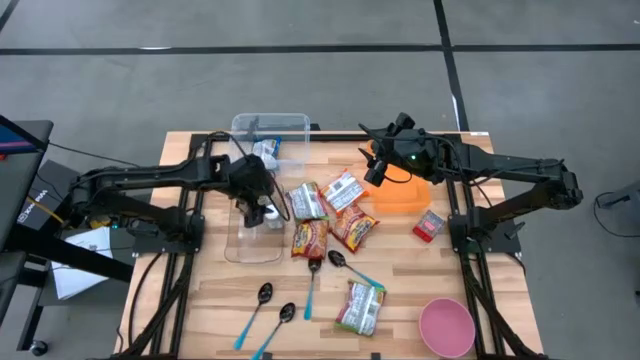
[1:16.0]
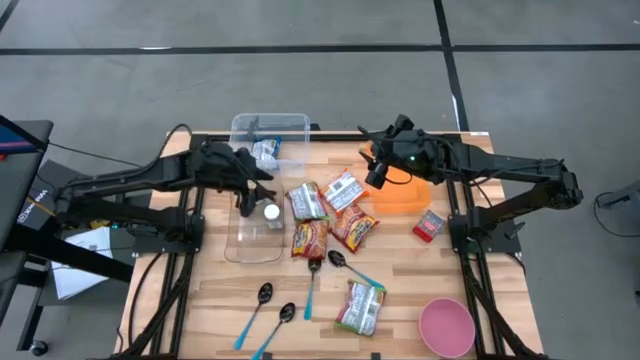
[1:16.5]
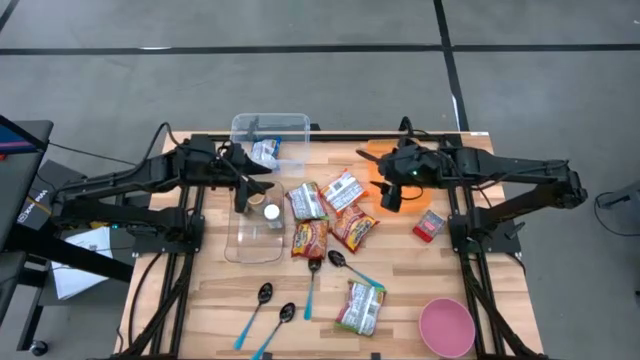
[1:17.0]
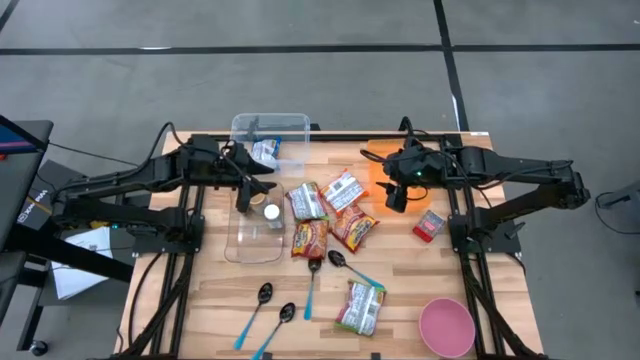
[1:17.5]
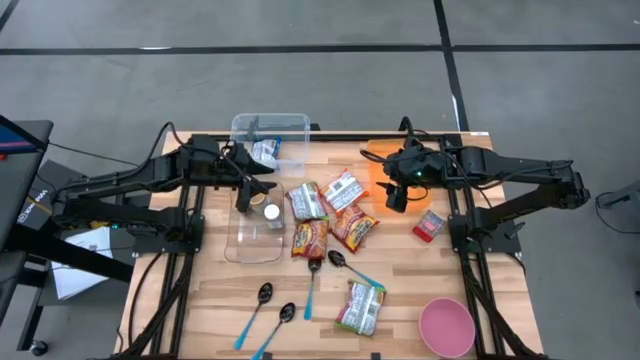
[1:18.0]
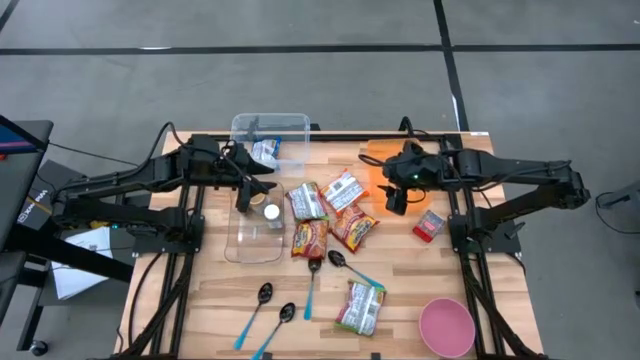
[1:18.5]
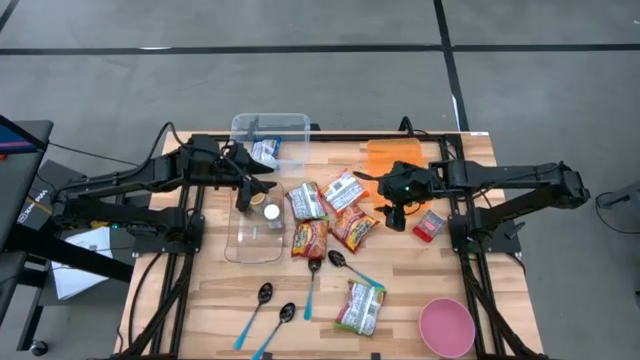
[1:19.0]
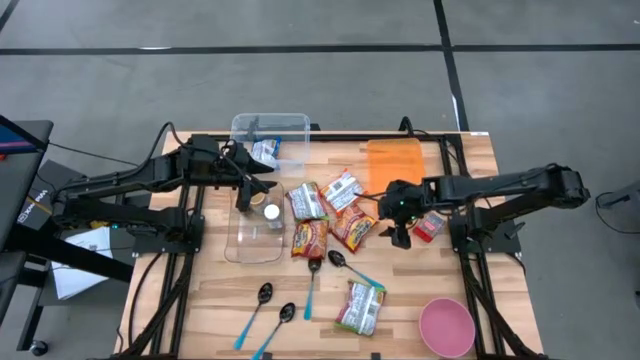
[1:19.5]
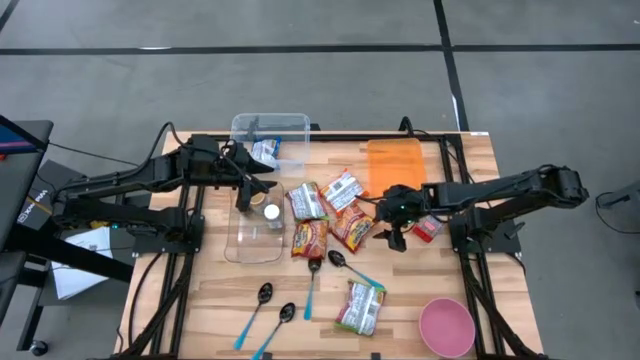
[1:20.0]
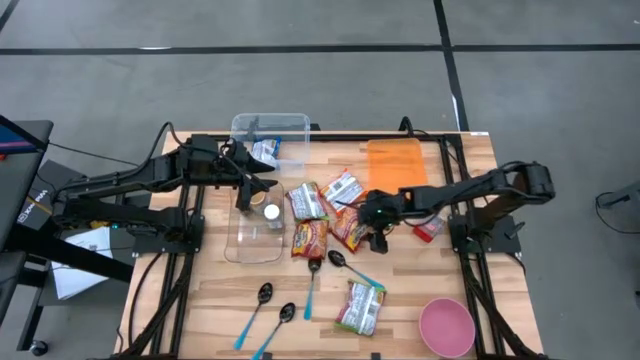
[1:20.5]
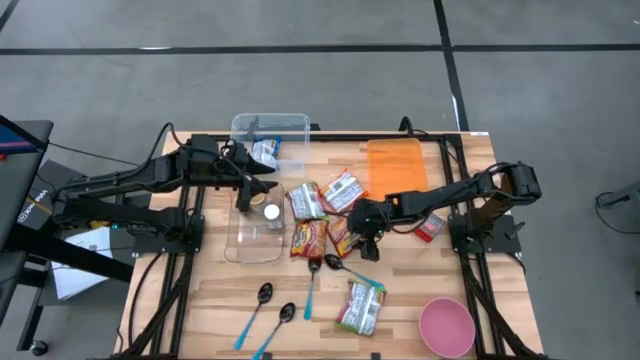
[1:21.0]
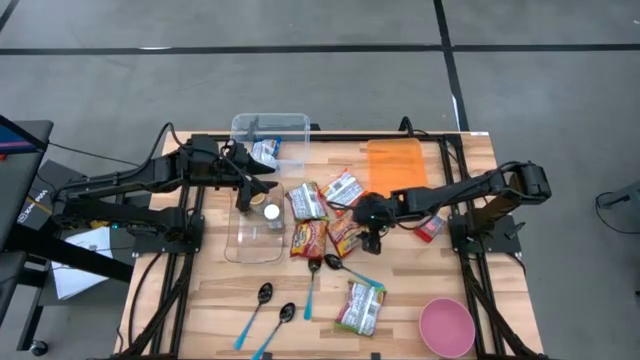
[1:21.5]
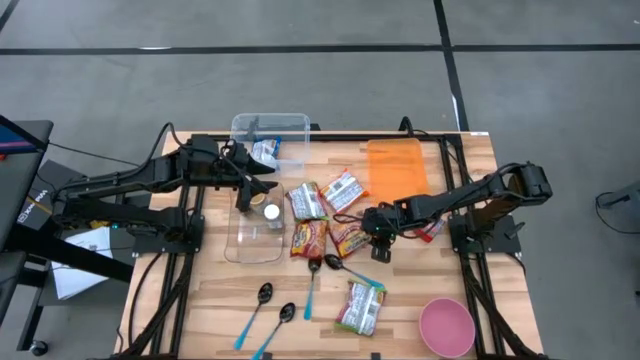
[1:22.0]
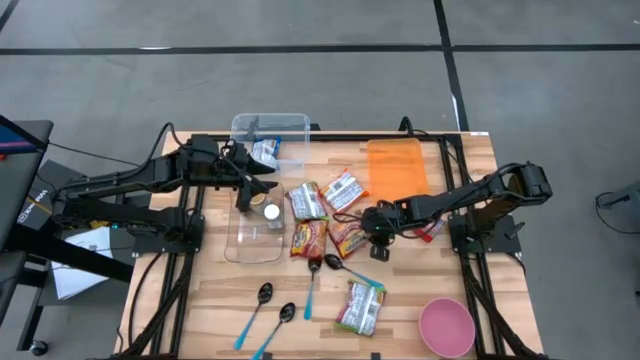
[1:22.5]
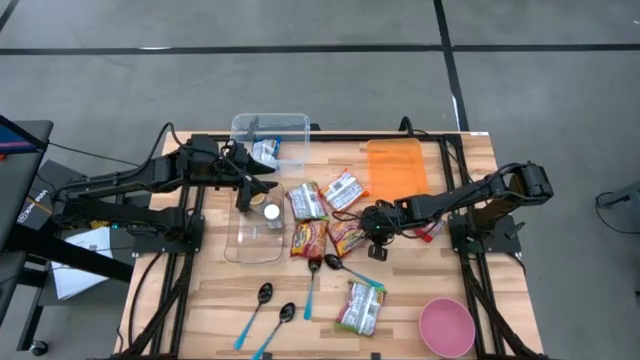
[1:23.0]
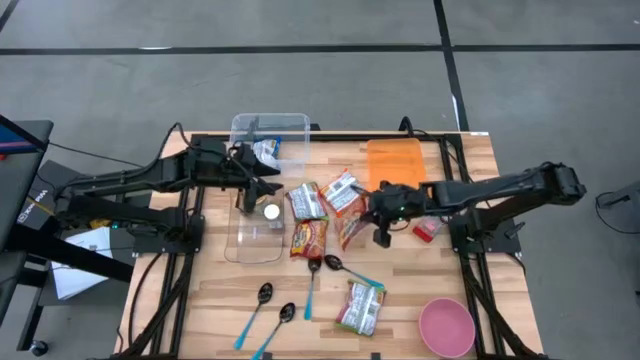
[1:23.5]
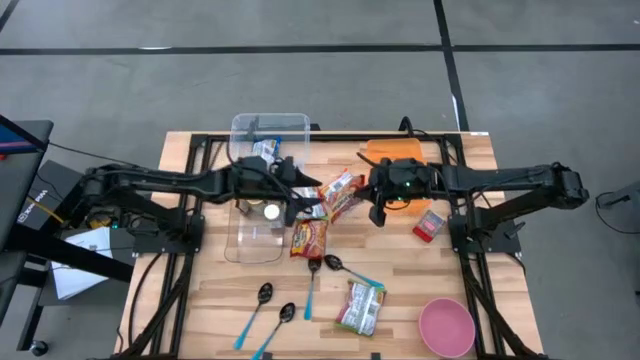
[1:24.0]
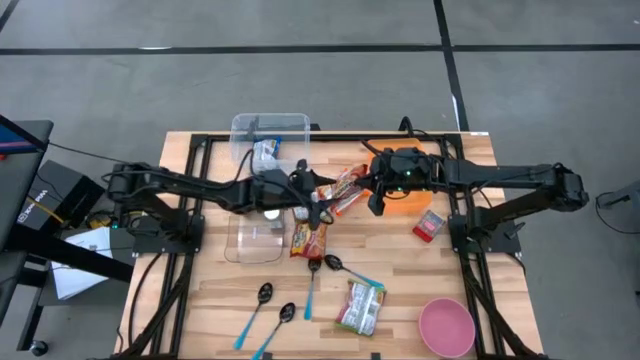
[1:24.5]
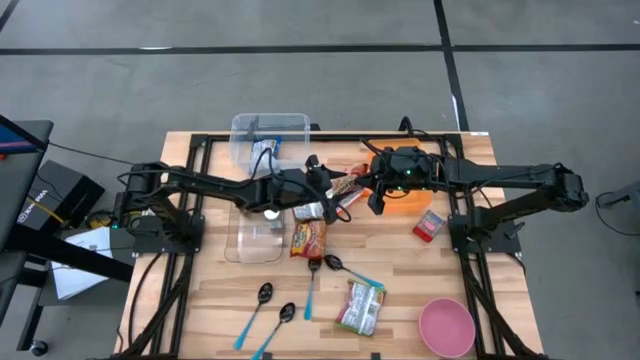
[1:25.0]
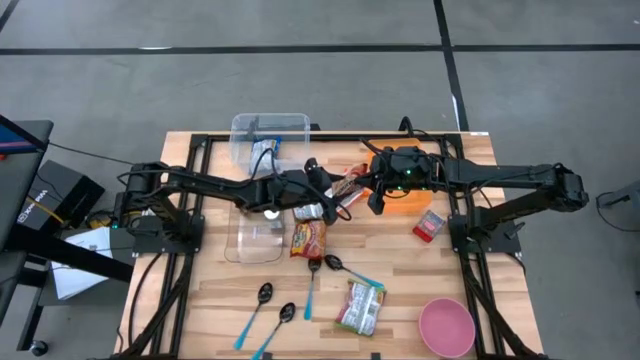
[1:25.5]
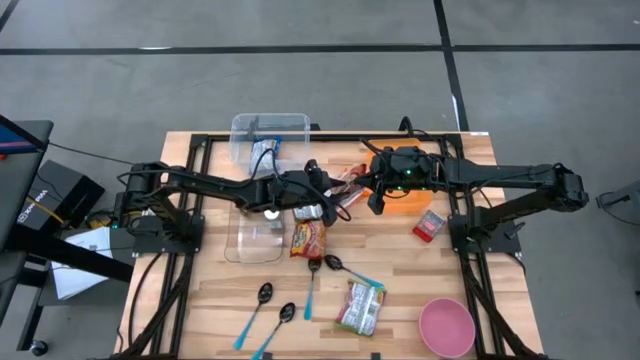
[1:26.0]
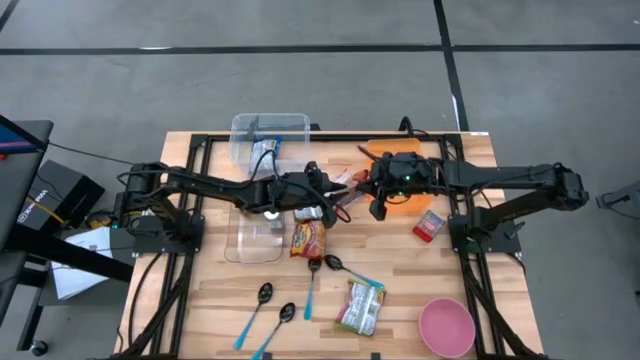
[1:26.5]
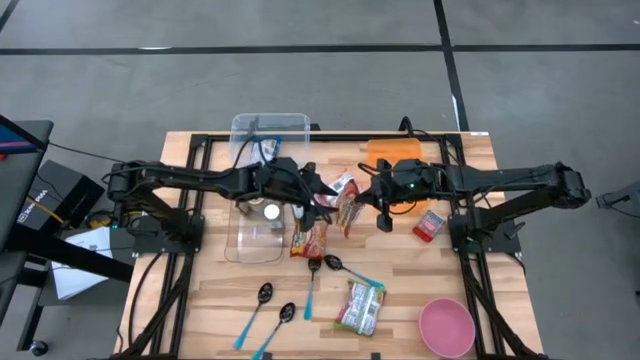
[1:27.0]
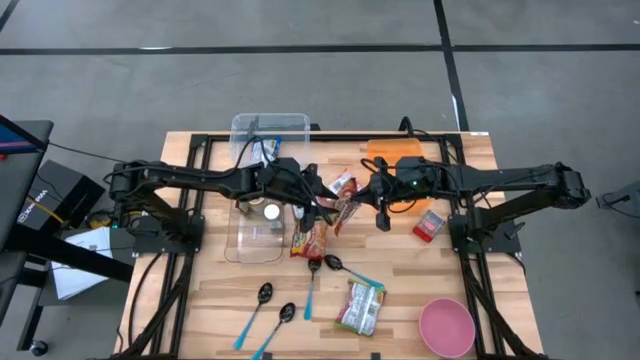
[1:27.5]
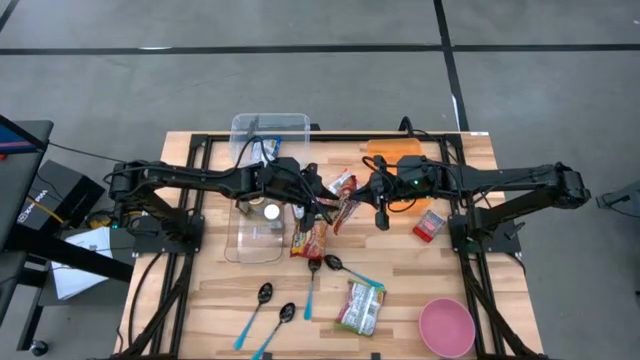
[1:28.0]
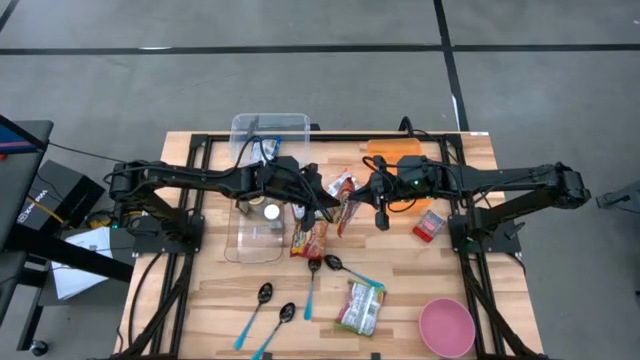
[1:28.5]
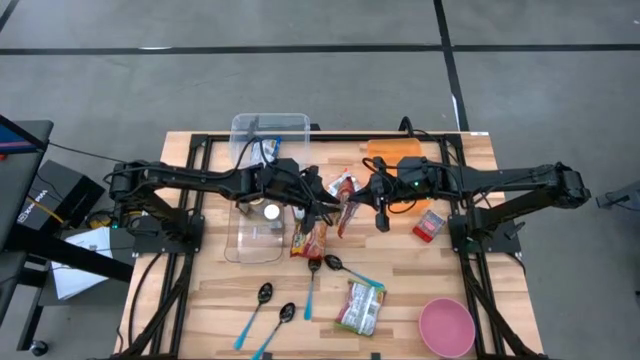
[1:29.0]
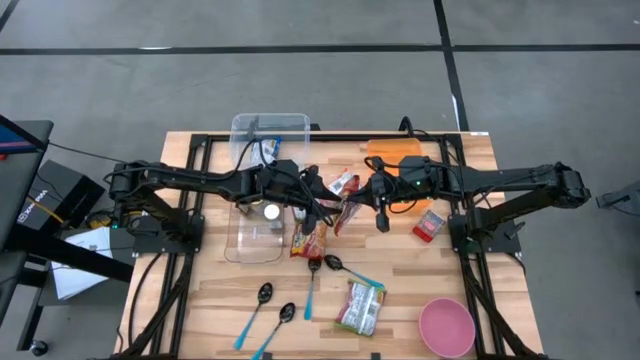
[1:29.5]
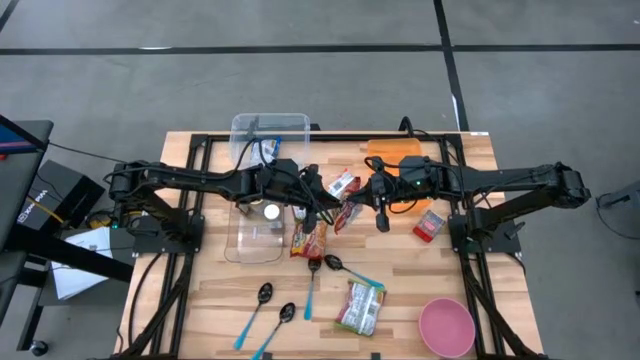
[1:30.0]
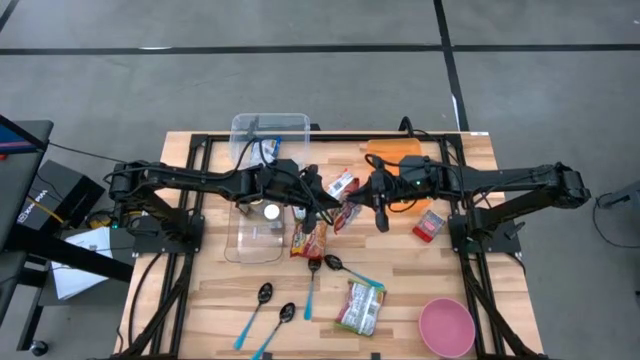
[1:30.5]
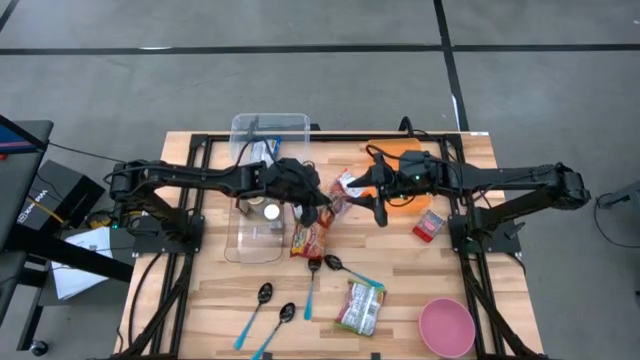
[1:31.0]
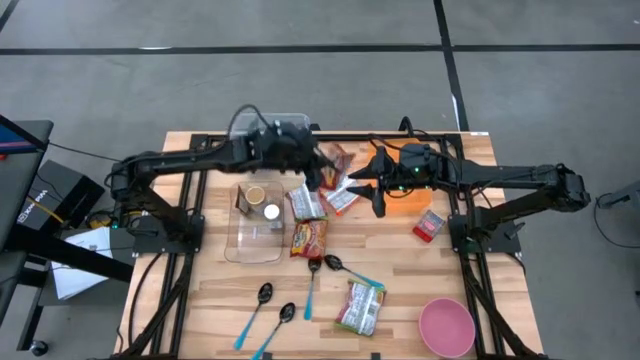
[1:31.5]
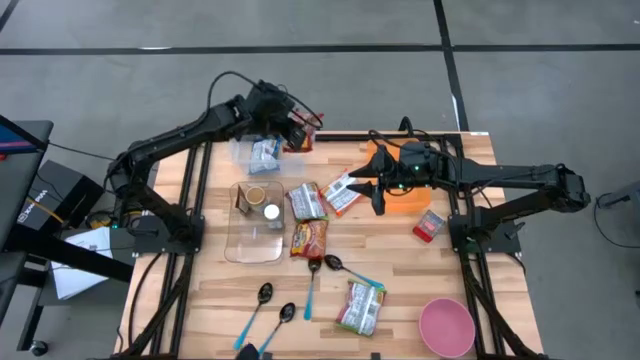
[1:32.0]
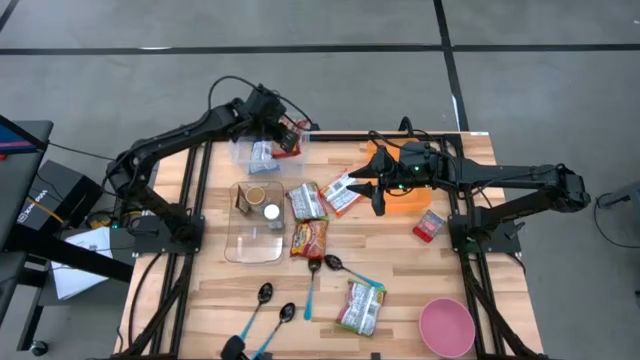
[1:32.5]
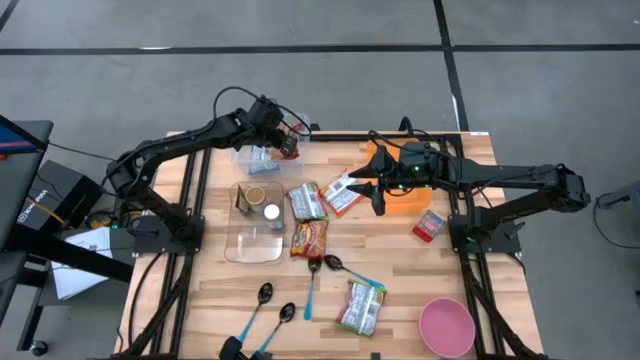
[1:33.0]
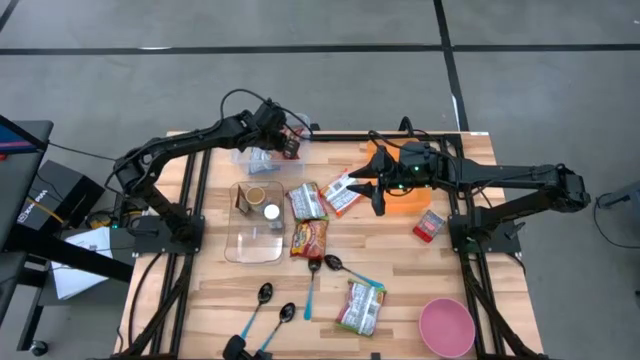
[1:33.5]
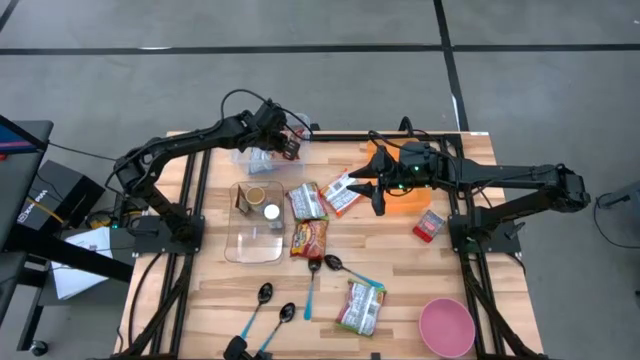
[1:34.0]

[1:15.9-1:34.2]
Task: Pick & Place Food Item
Put the red noodle pack into the transparent container
